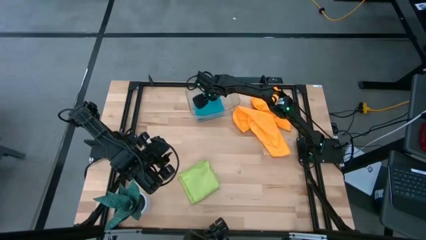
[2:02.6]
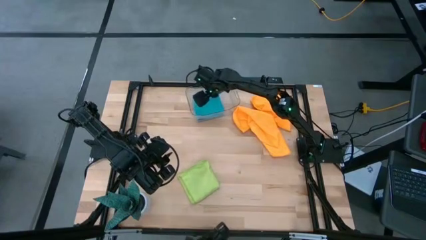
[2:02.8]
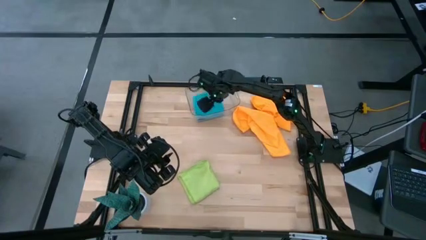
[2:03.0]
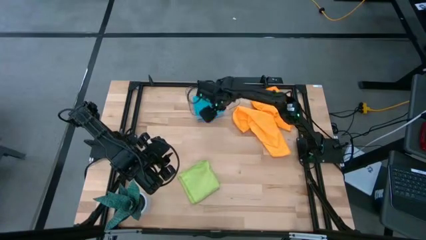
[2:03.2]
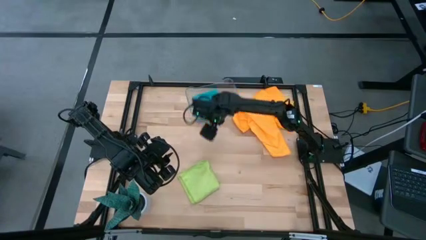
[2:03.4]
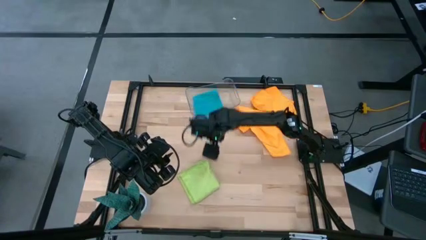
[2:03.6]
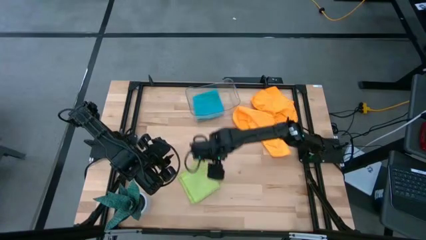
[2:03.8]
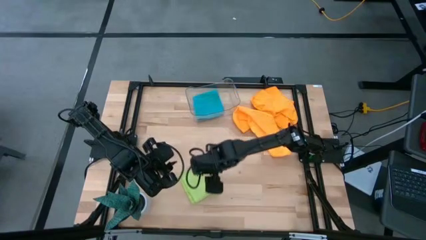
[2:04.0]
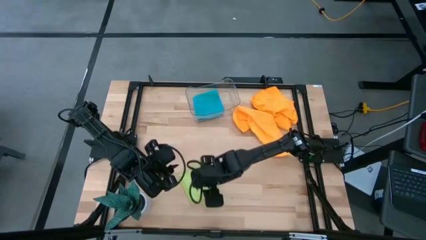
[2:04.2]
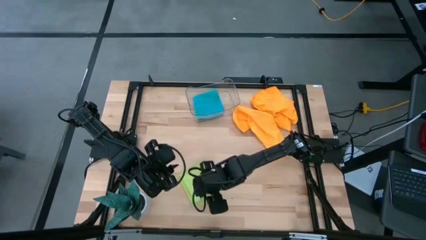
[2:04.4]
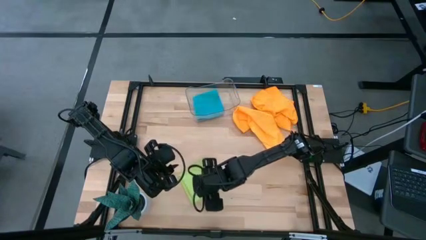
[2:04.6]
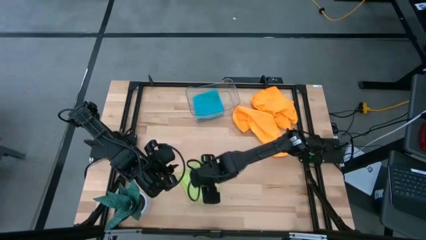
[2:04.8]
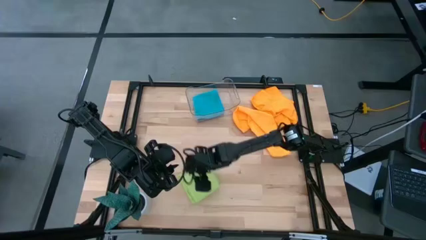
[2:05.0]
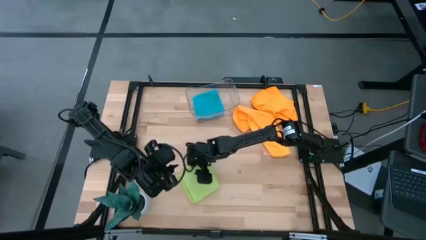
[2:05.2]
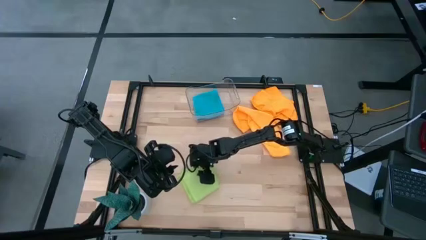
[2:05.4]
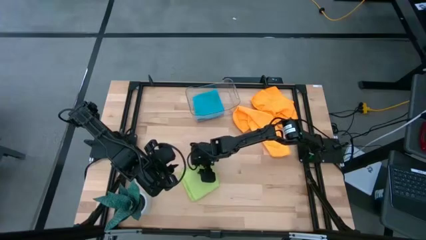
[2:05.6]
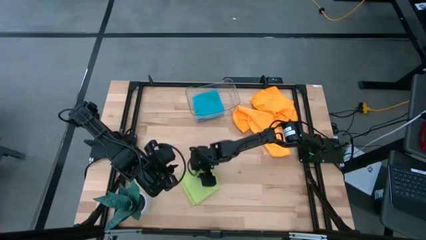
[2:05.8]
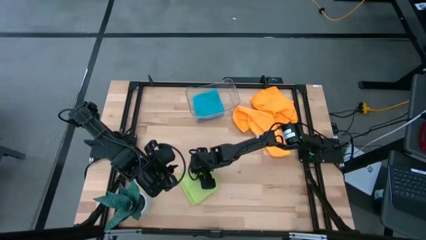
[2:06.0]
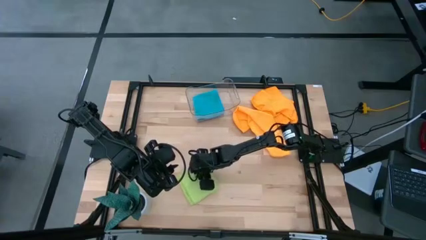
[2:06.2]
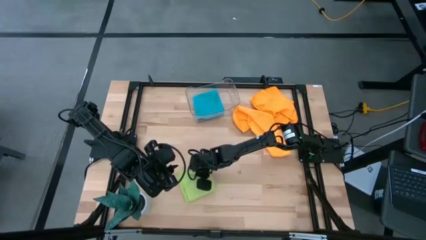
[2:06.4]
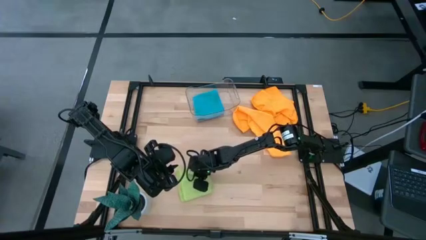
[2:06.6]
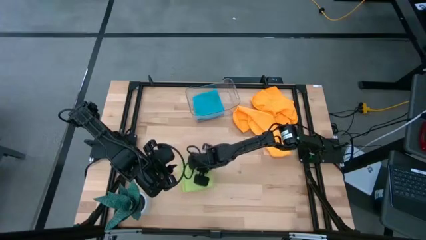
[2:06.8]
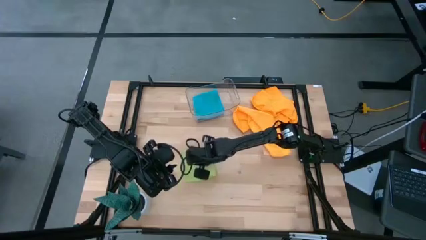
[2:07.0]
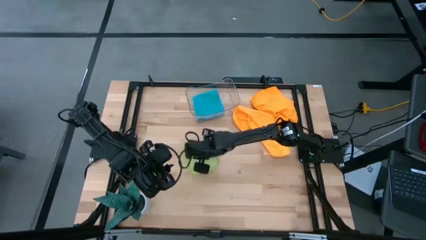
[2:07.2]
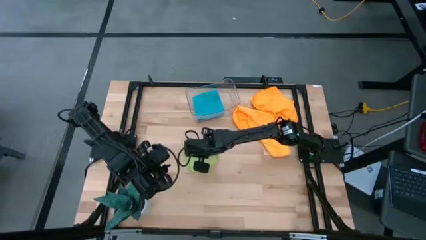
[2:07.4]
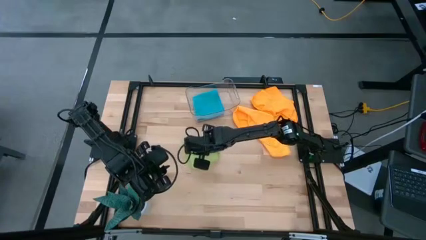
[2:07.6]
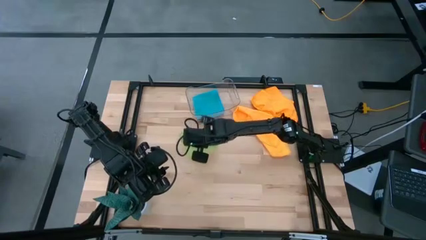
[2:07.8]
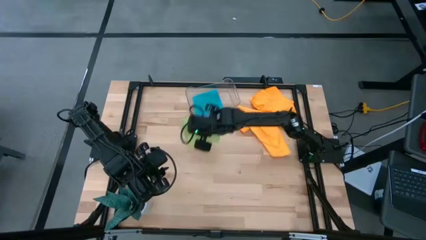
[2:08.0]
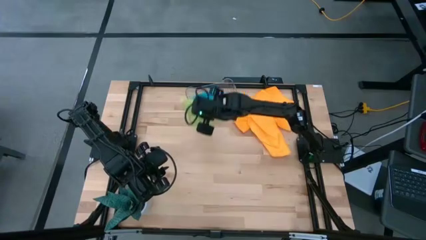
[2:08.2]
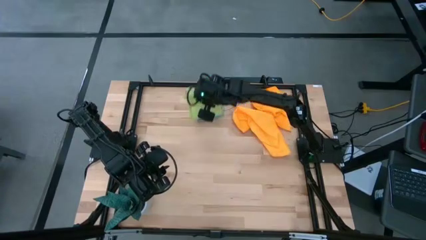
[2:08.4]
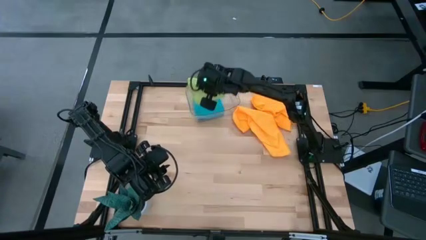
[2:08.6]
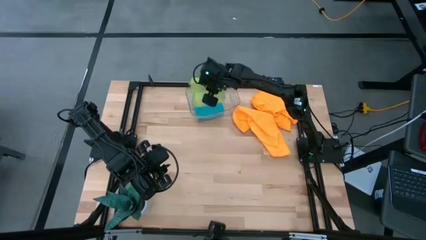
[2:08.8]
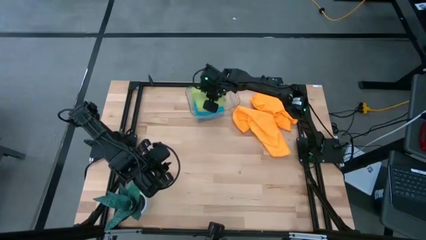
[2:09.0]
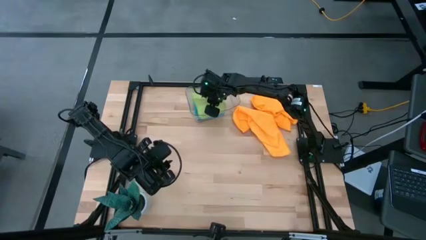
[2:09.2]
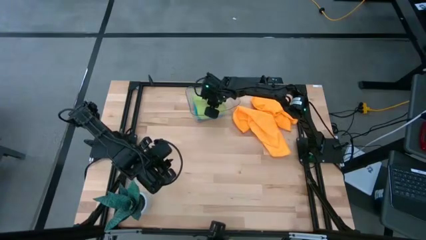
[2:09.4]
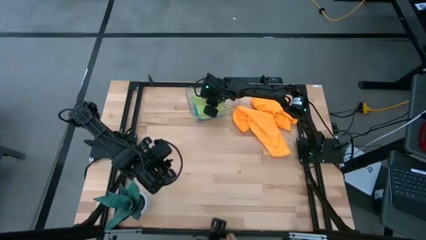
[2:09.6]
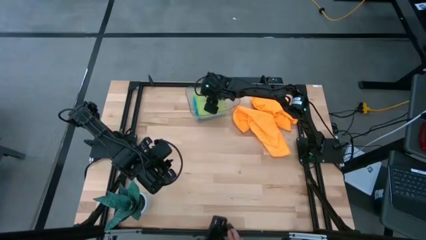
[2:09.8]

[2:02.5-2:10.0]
Task: Fold microfiber towels
Stack the folded green microfiber cloth on top of the blue microfiber cloth

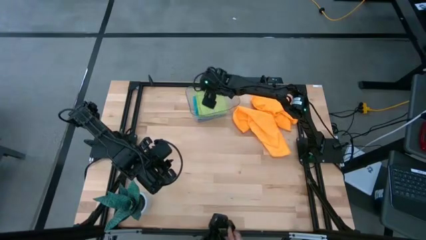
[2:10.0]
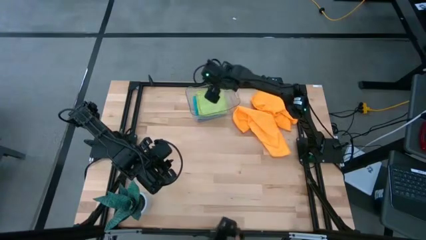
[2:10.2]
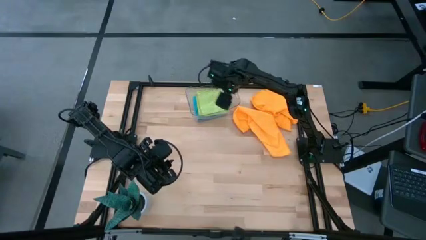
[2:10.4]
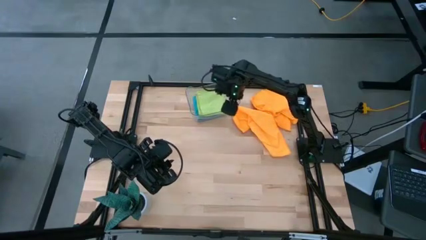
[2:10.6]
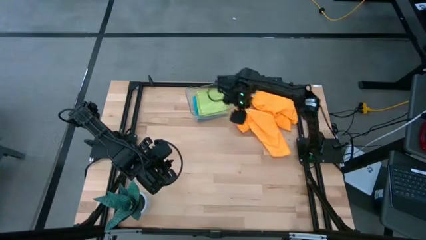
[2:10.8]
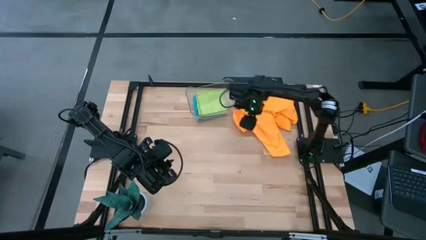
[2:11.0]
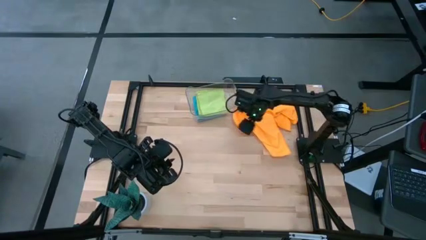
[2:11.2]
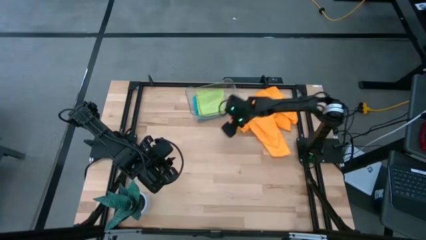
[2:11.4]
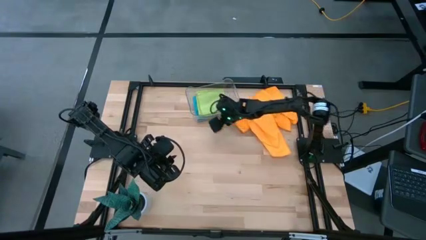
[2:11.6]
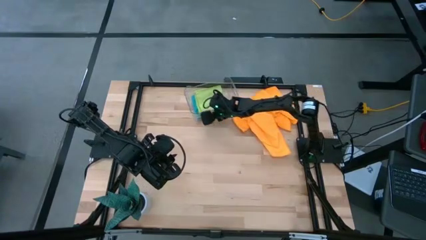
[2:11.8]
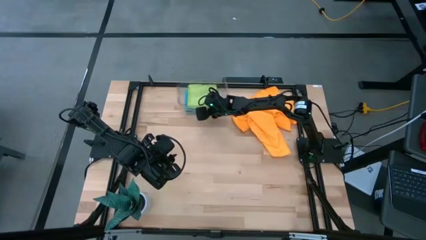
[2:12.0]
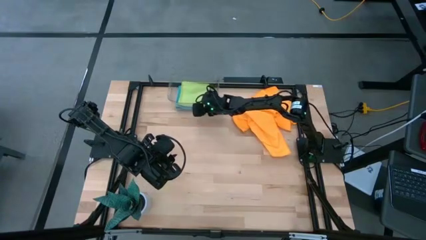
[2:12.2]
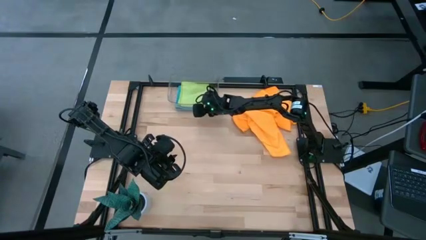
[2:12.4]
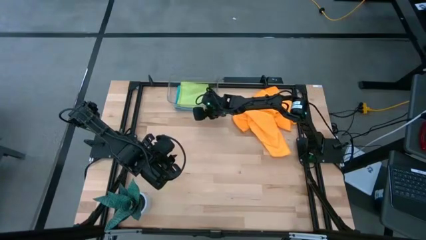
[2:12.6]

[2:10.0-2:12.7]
Move the transparent bin to the top left of the table

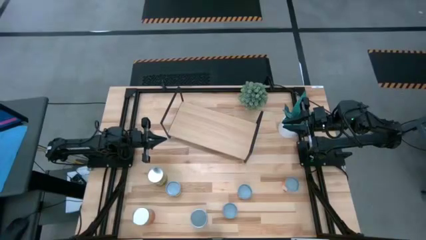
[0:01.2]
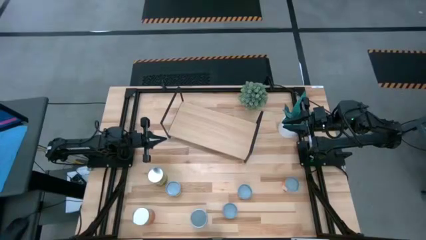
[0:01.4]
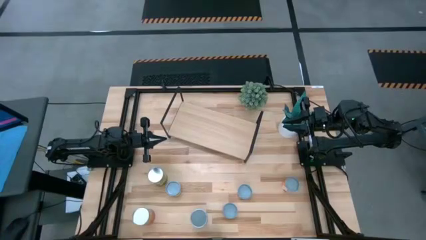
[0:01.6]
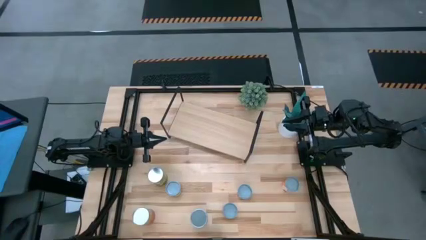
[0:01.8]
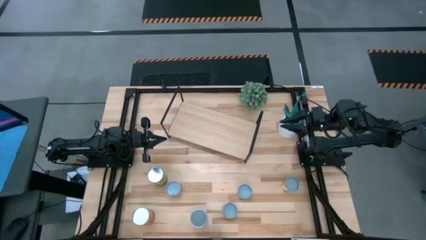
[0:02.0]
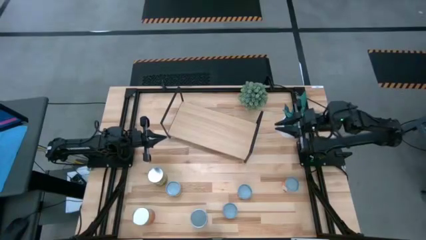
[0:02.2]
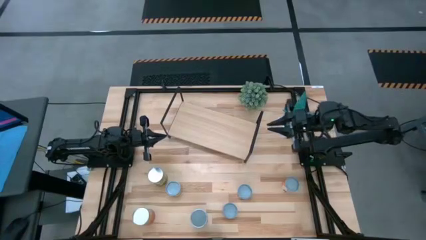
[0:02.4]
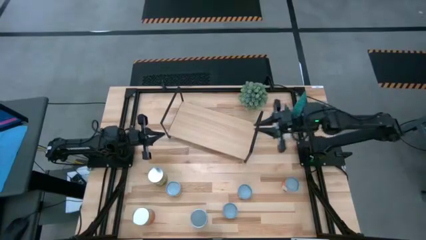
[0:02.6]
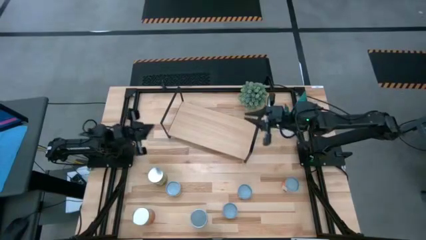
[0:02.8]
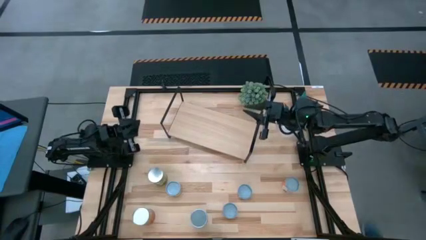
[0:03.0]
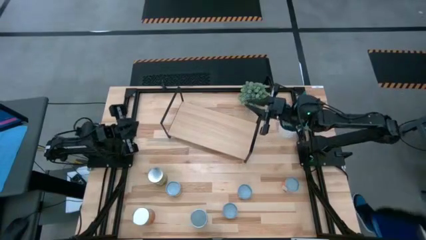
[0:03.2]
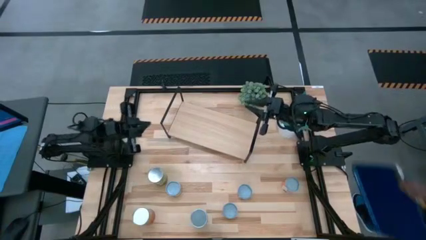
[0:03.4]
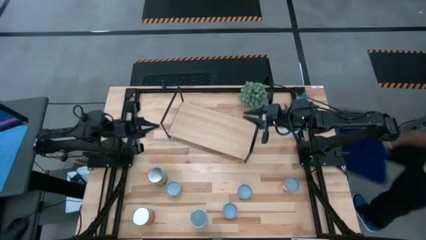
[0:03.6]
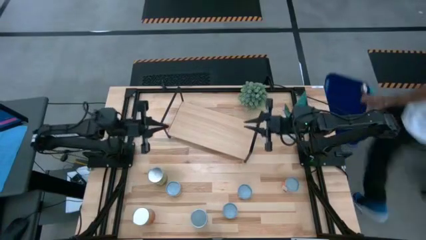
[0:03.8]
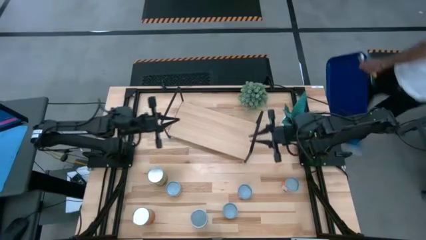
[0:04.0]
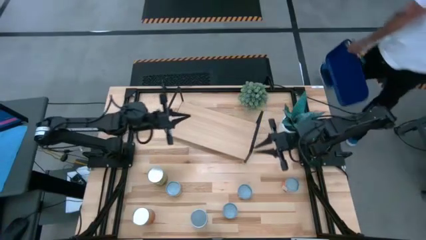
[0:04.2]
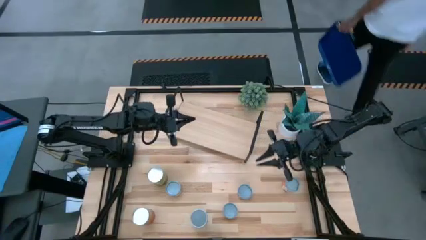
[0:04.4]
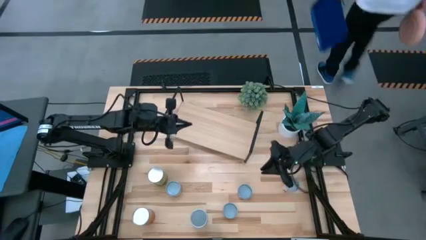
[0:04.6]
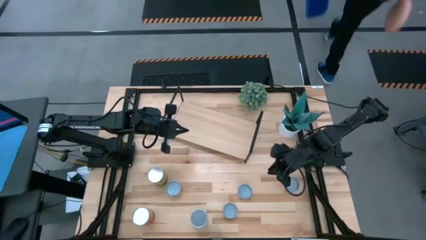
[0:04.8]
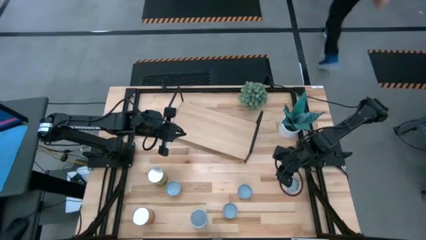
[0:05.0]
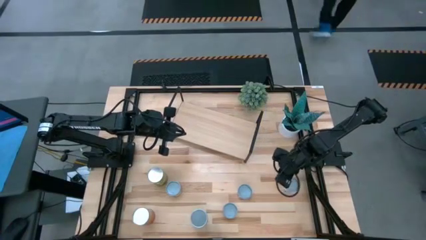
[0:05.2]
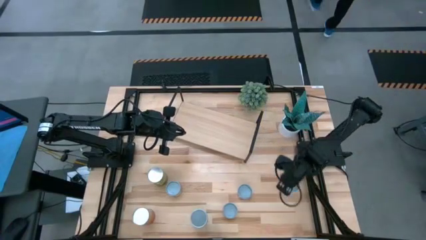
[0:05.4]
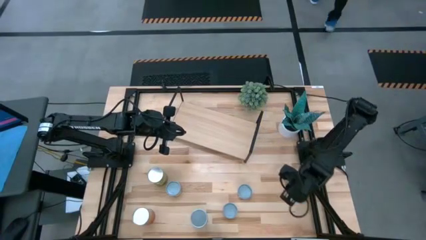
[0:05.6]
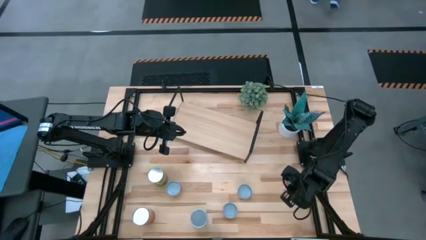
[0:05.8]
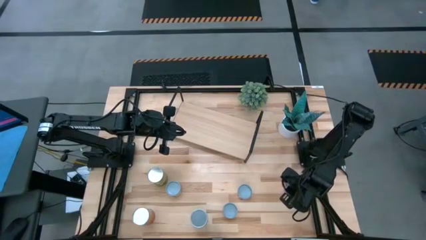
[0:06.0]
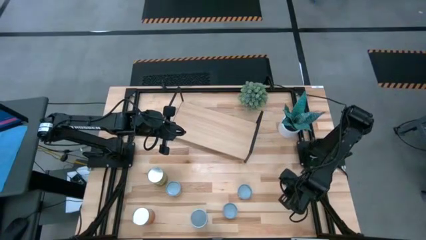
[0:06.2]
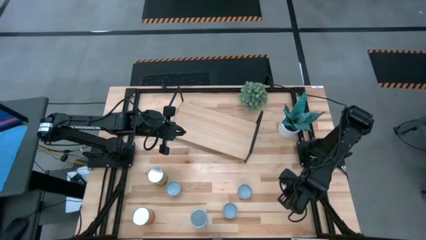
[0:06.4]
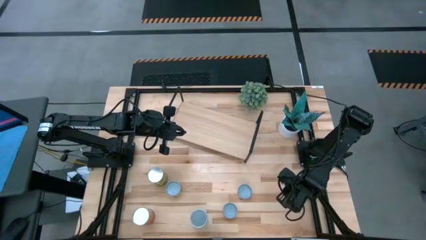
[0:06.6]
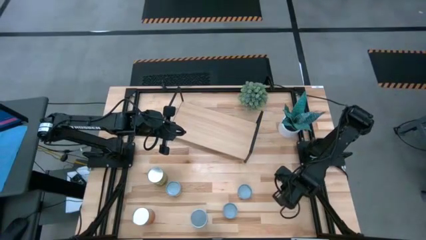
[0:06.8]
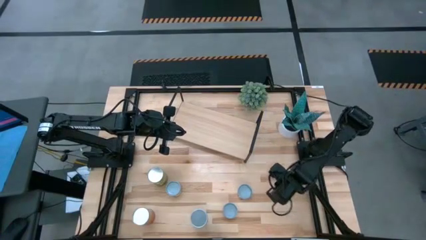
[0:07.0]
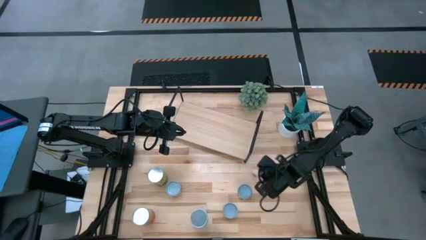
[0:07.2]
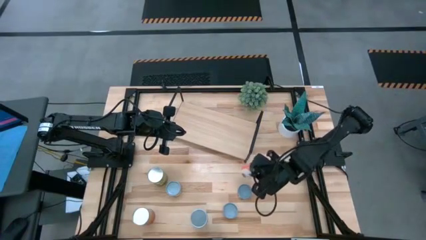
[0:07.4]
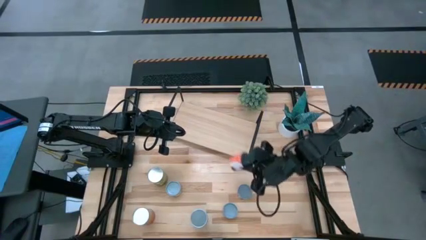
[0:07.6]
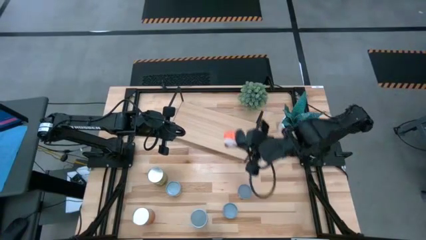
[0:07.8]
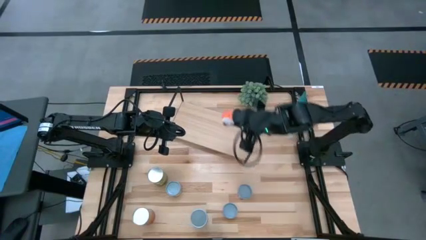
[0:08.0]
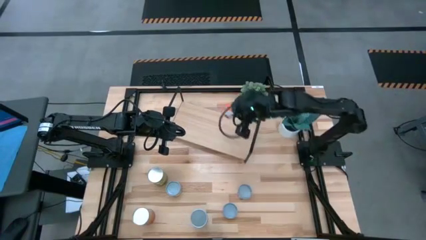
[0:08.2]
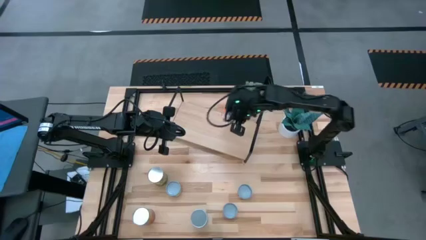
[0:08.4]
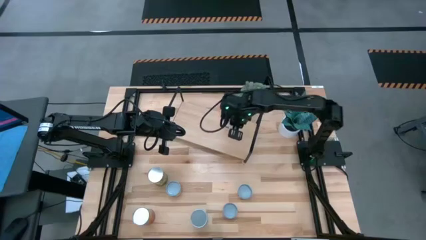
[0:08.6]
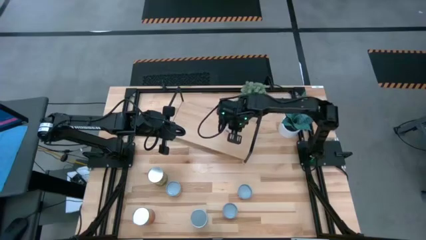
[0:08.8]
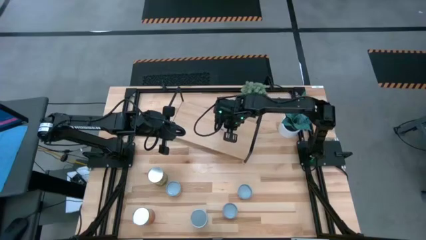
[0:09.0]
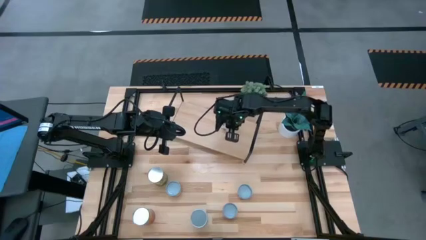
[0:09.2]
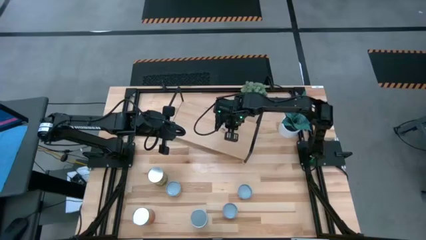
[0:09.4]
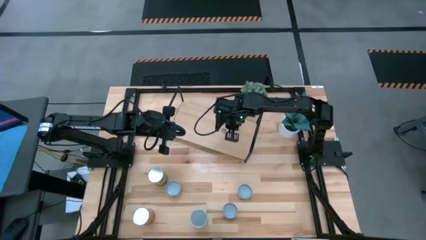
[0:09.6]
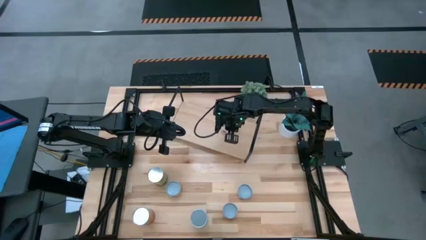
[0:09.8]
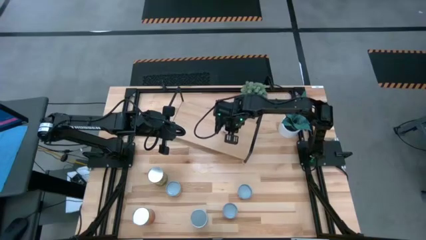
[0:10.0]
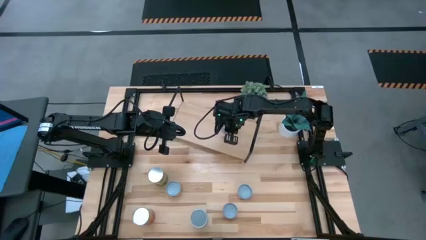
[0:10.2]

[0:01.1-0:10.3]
Task: Pick and place cans onto a shelf
Put the canned meatballs on the shelf
